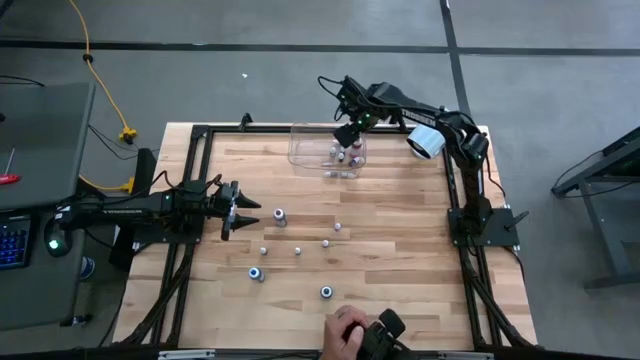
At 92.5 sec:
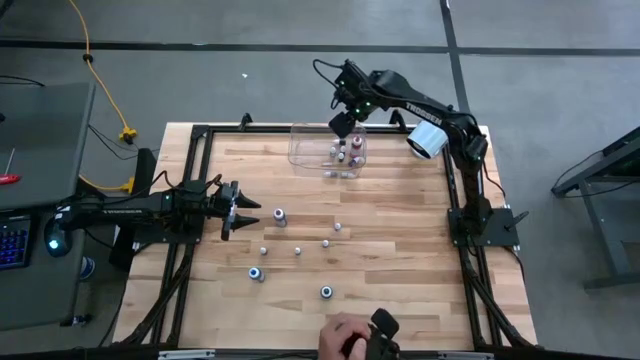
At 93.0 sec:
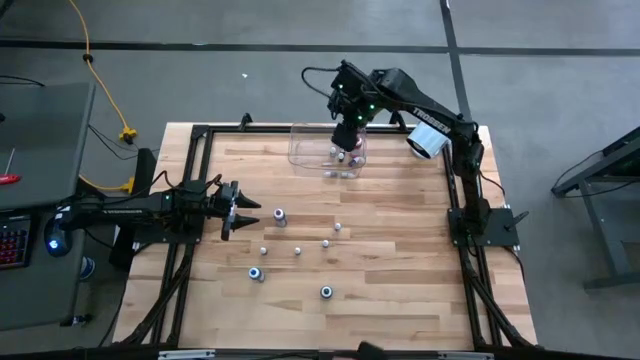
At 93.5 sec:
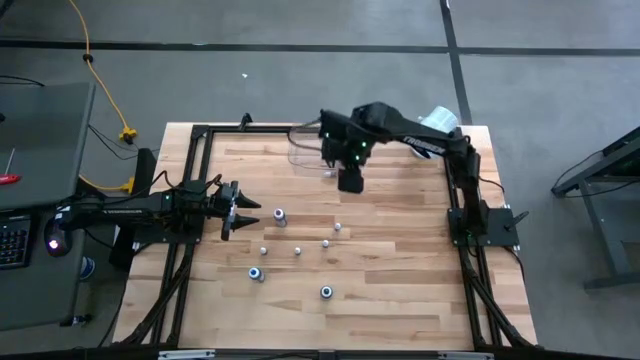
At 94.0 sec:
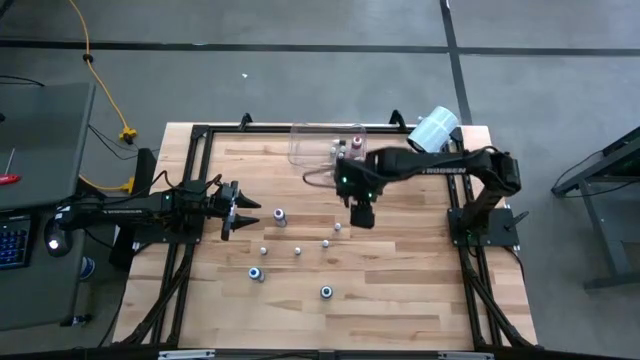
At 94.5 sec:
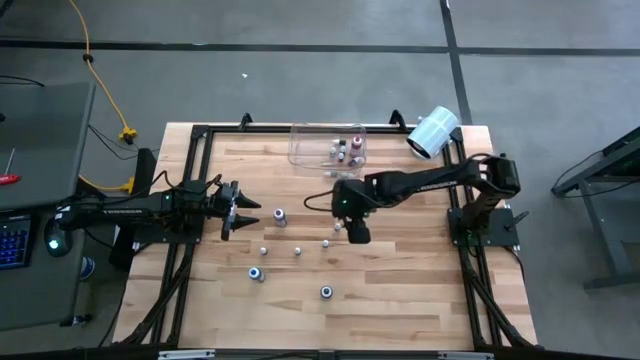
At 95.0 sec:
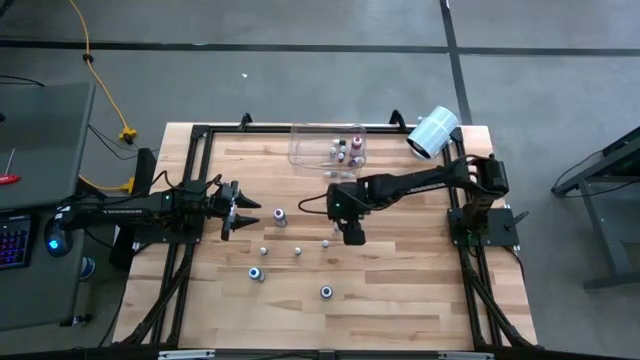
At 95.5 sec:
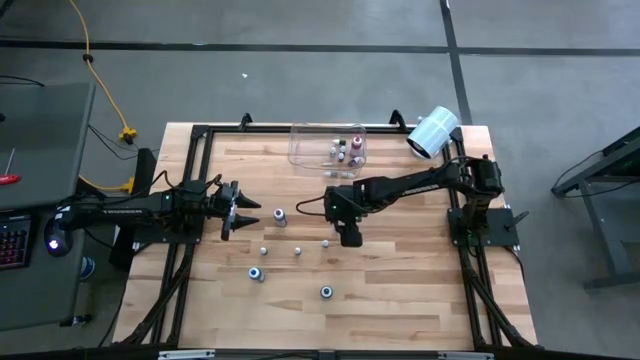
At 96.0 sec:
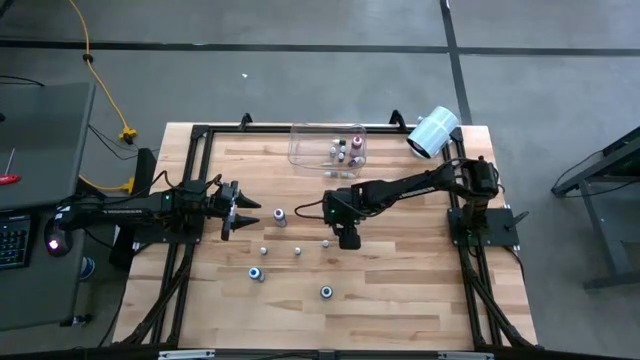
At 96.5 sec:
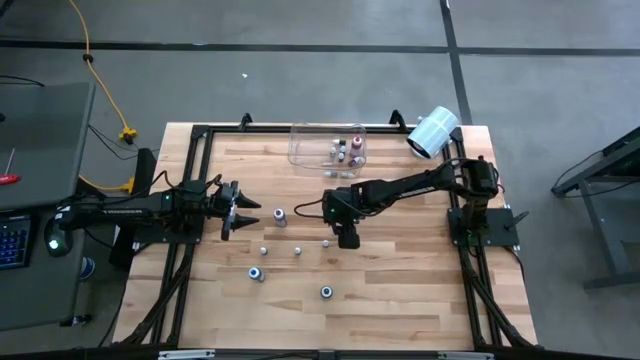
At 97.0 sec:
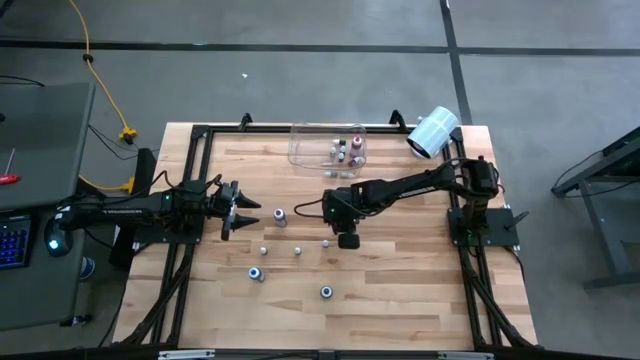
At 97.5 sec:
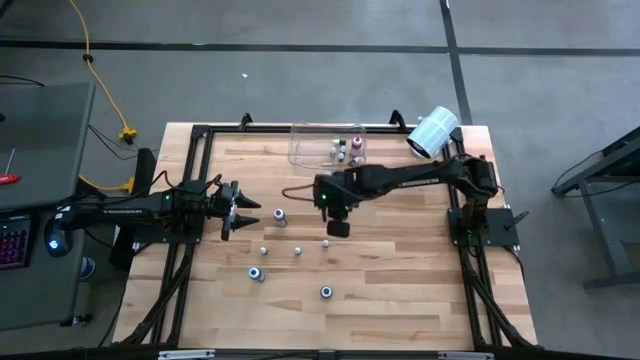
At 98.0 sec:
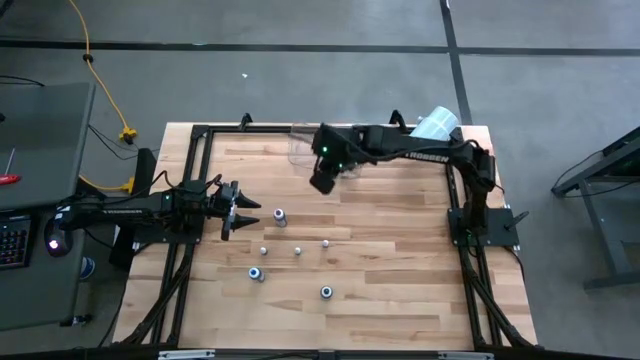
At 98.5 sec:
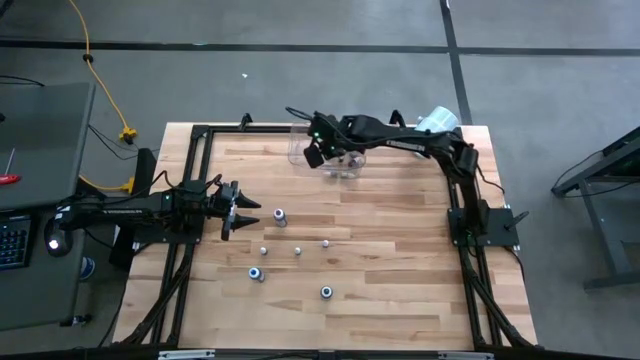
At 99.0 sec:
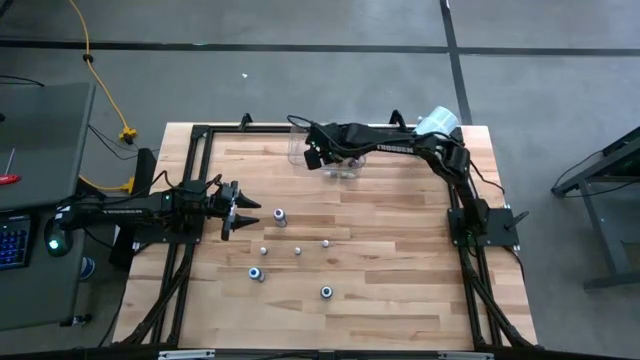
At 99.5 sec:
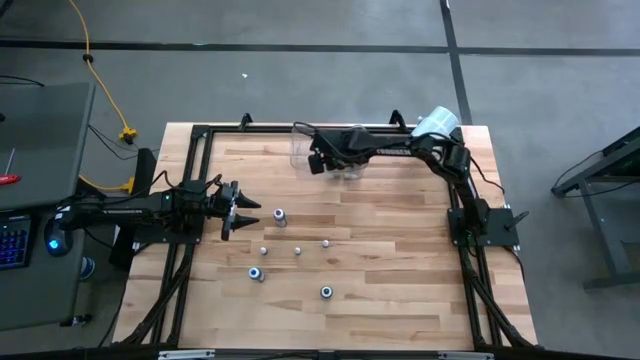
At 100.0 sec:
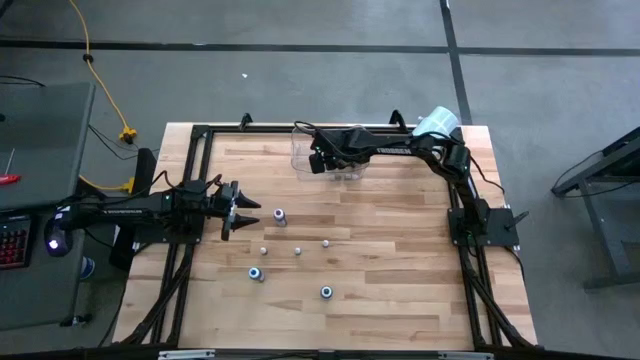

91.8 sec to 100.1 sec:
Task: Pick & Place food coloring
Put the small purple food coloring into the transparent container

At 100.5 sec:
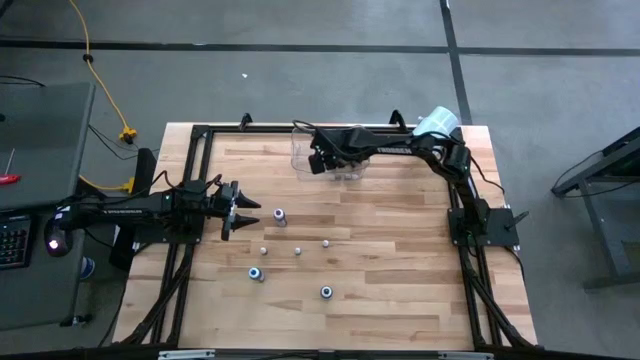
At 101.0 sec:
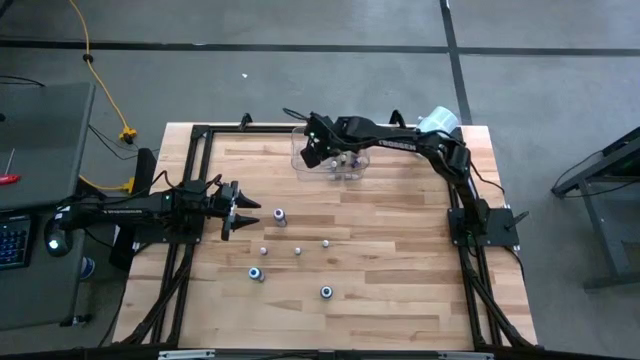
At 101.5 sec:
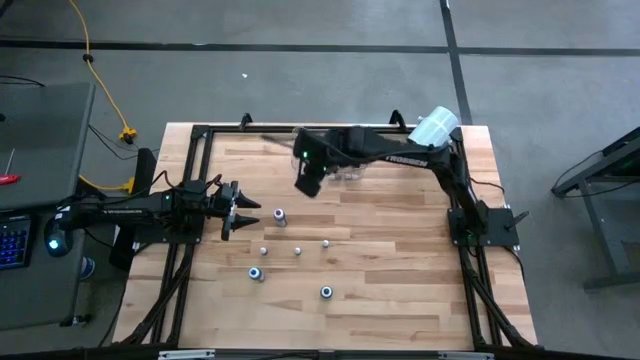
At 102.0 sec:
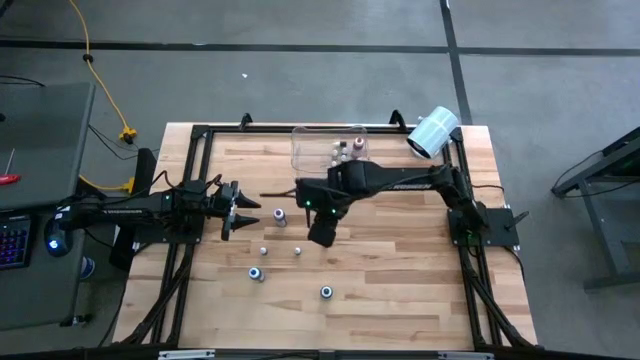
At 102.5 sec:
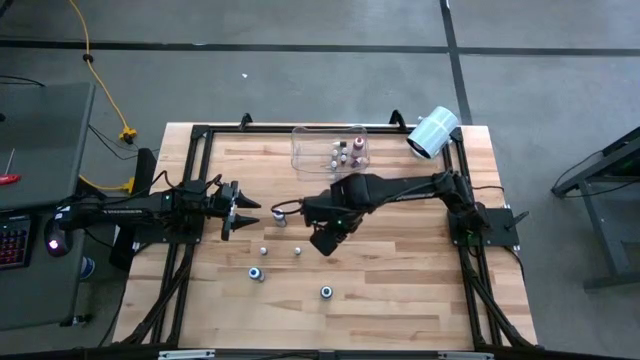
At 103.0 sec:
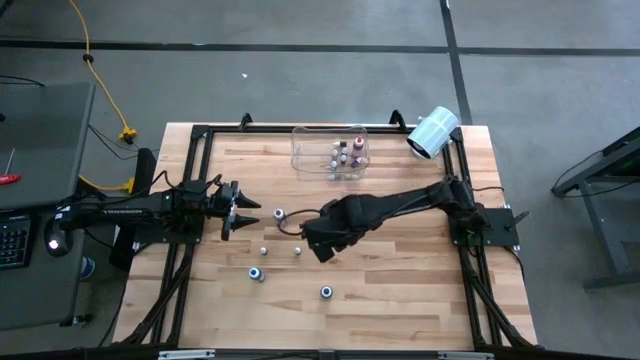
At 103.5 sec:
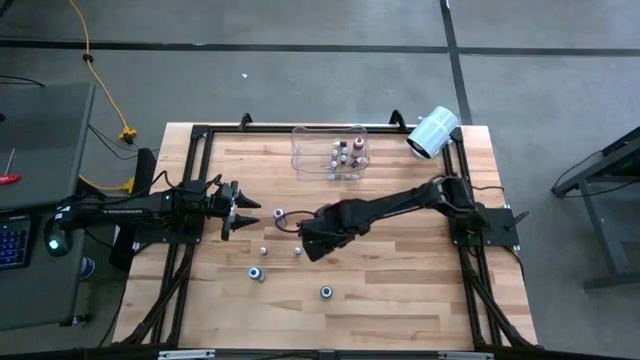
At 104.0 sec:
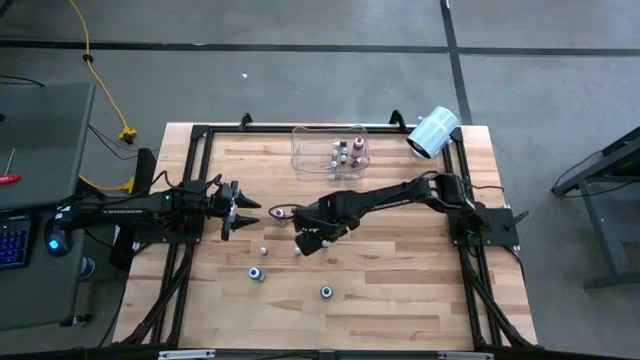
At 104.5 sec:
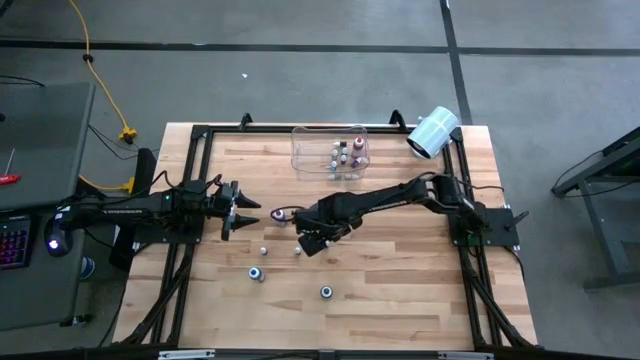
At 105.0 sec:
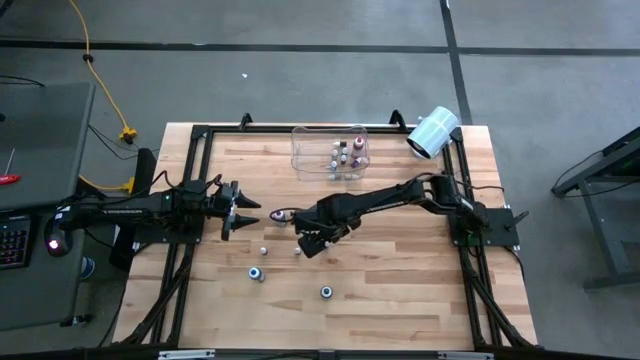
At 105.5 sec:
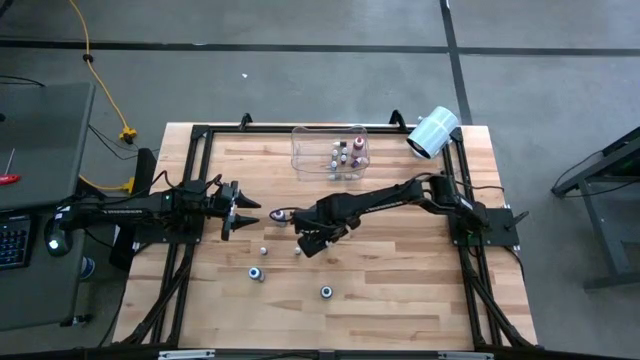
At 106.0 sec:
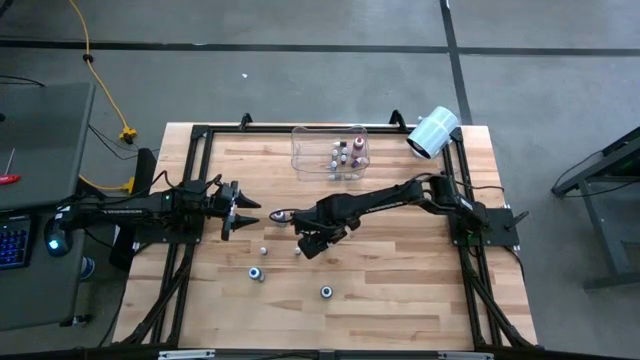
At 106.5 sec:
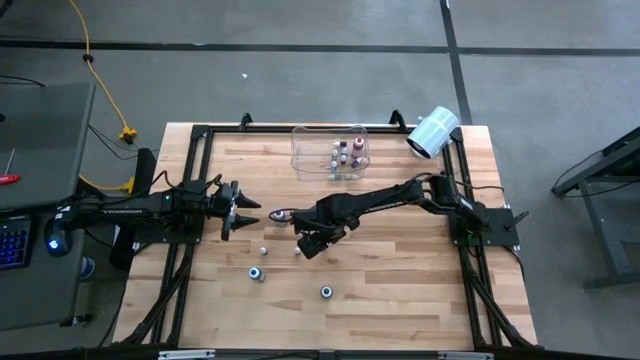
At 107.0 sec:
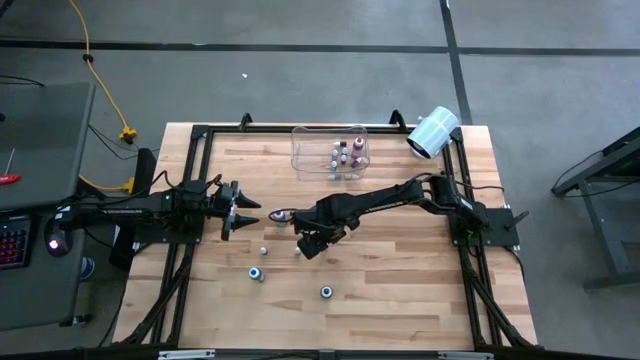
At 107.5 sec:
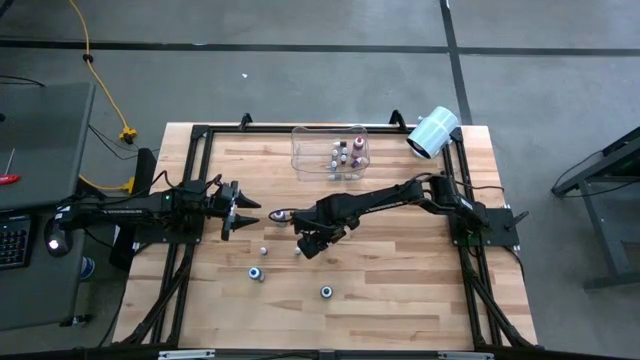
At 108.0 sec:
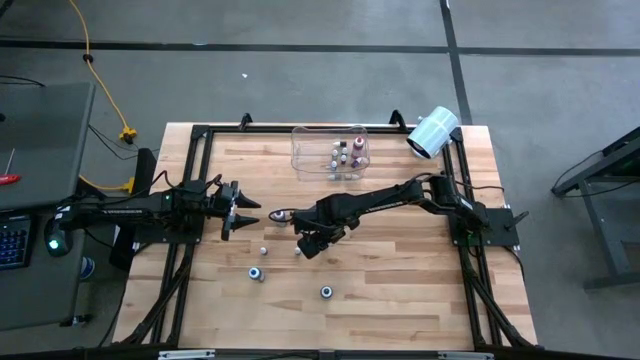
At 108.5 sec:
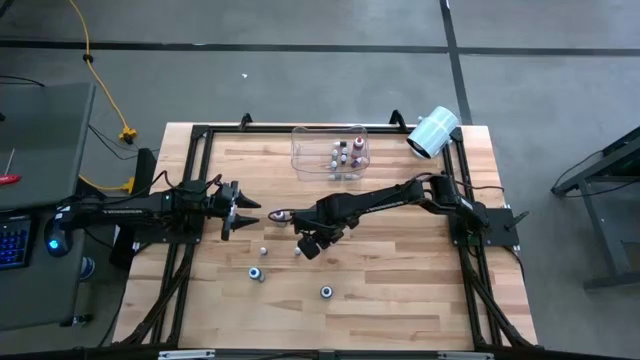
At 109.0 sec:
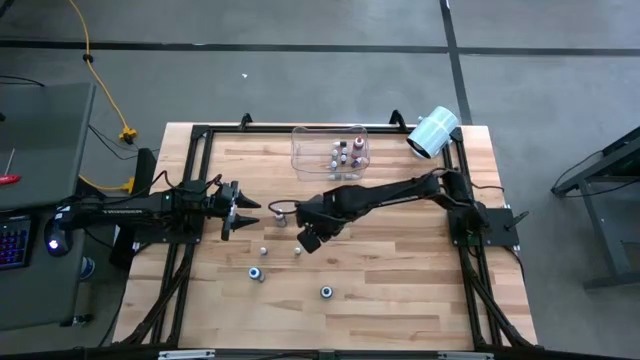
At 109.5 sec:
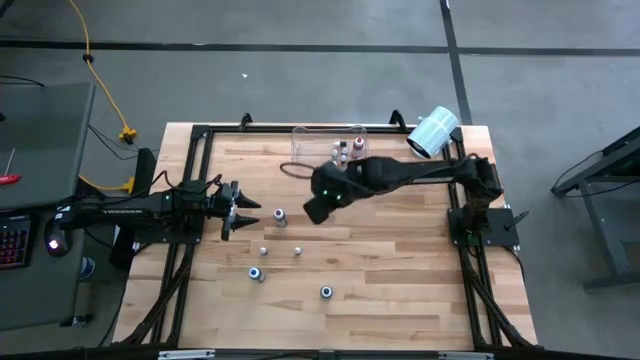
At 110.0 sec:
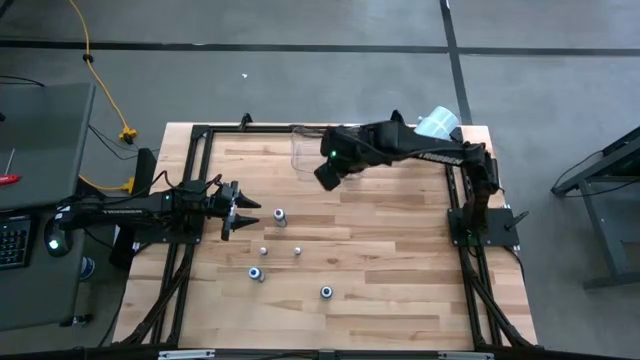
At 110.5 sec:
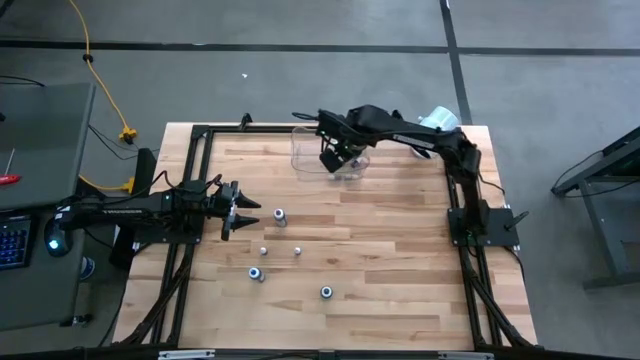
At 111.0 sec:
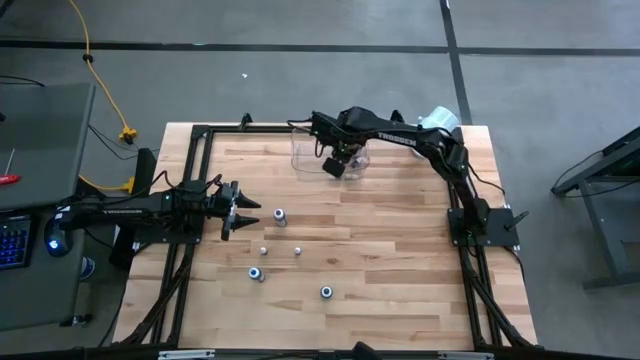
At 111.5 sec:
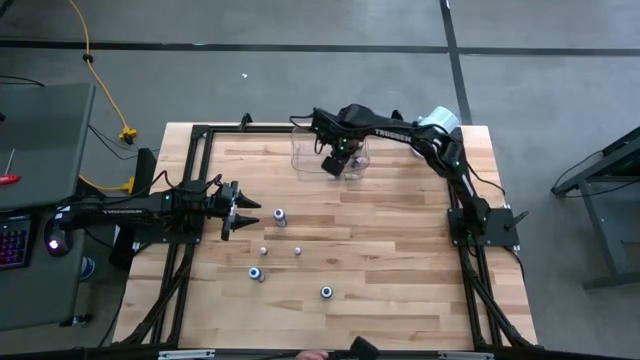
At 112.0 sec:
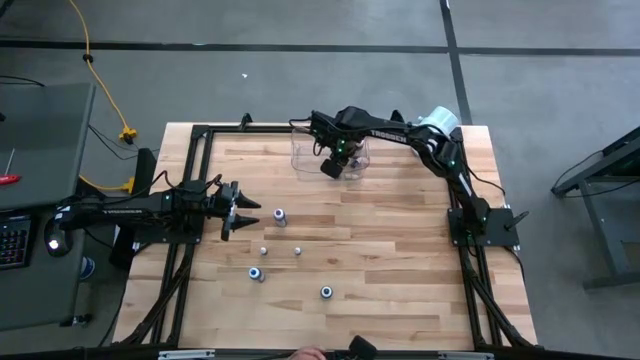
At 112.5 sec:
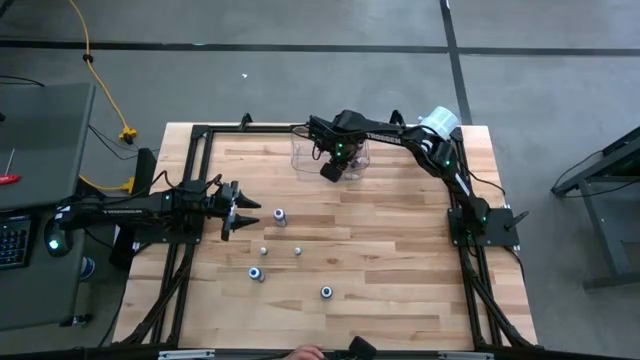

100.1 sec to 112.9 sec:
Put the small purple food coloring into the transparent container

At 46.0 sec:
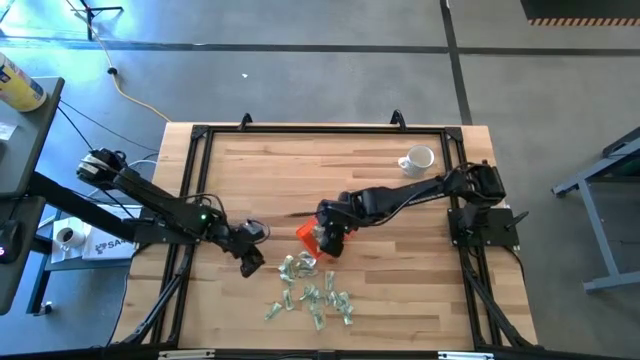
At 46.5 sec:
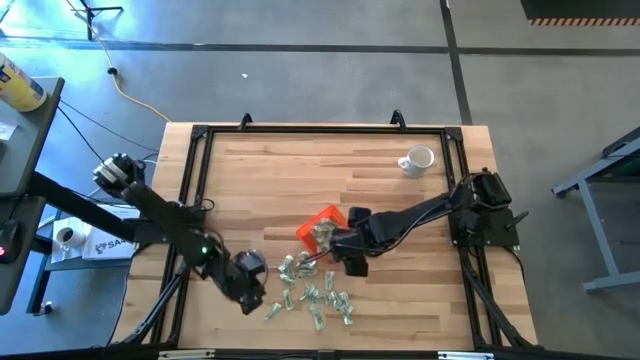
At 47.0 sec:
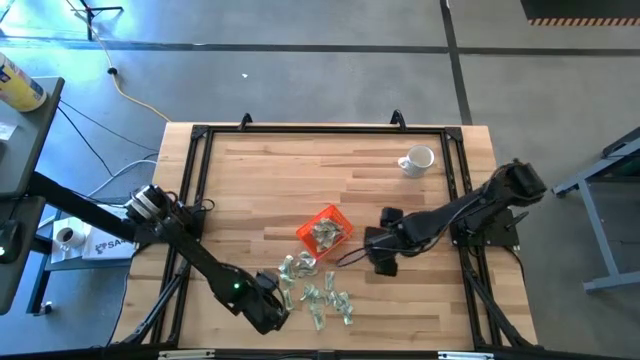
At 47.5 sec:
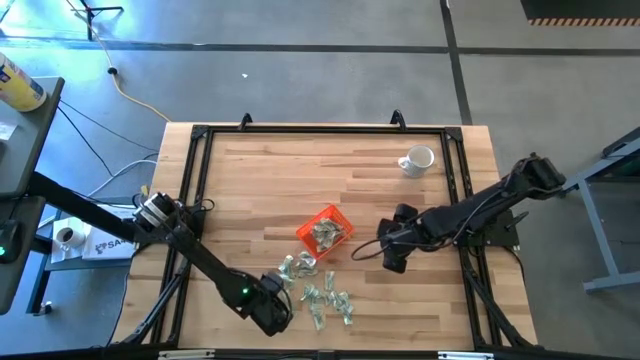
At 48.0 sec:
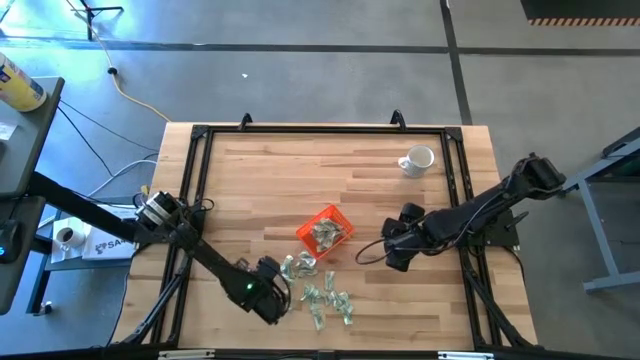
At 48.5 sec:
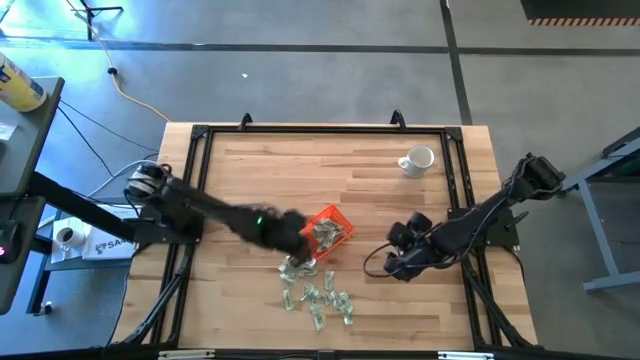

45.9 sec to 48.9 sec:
Task: Pick and place Stevia / Truvia into bins
Put the stevia packet into the orange bin
